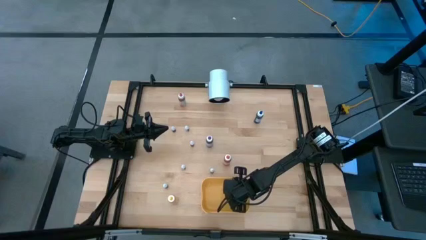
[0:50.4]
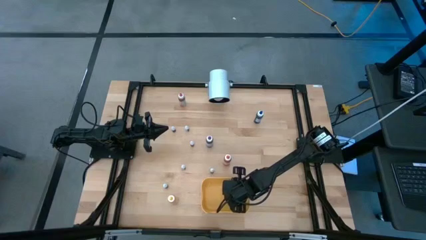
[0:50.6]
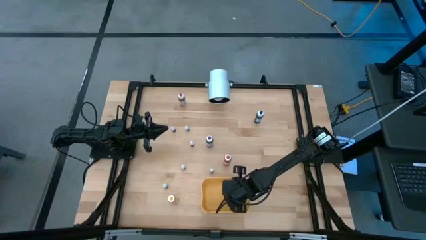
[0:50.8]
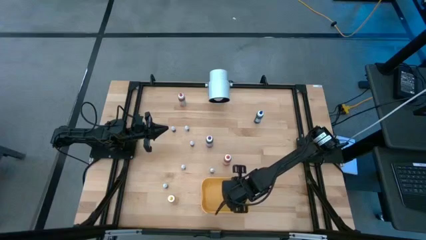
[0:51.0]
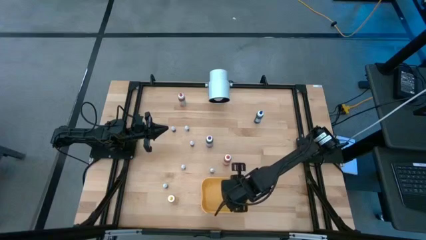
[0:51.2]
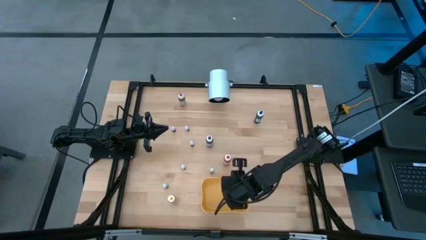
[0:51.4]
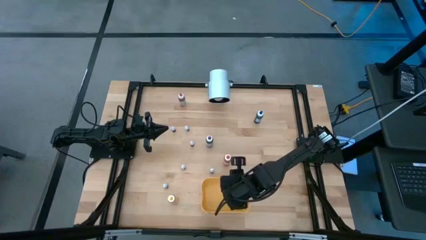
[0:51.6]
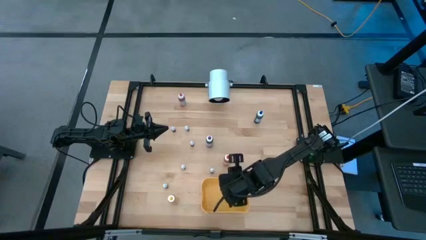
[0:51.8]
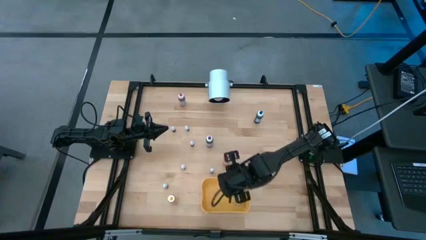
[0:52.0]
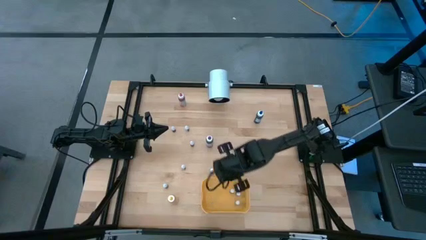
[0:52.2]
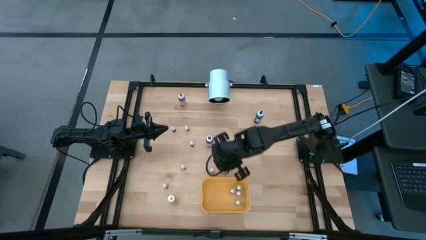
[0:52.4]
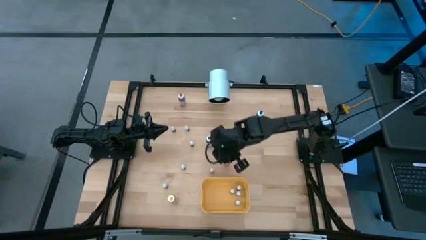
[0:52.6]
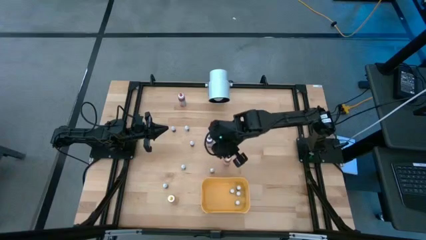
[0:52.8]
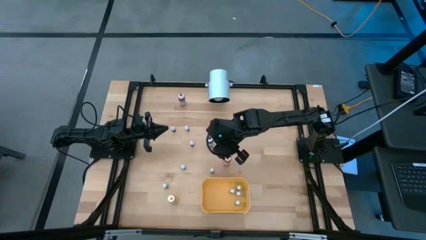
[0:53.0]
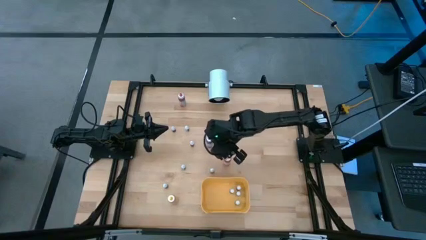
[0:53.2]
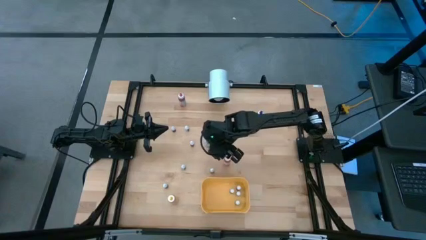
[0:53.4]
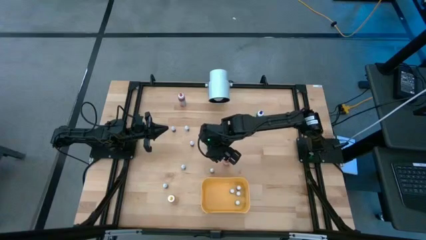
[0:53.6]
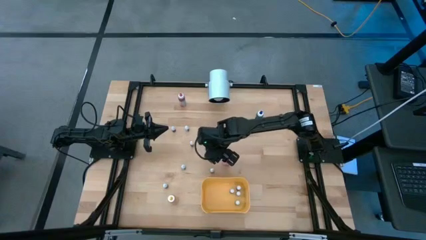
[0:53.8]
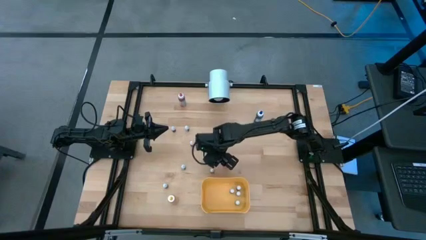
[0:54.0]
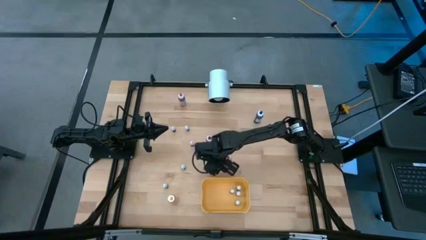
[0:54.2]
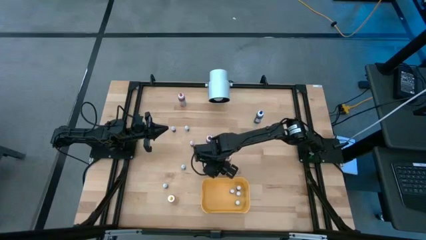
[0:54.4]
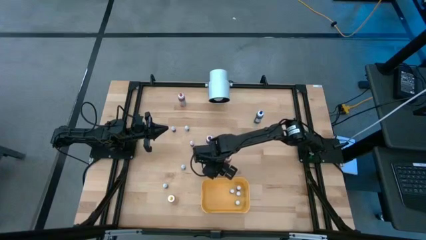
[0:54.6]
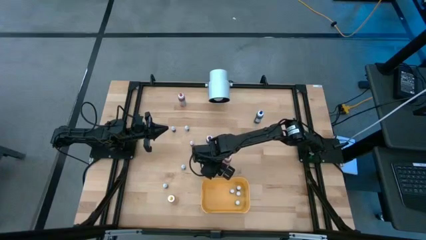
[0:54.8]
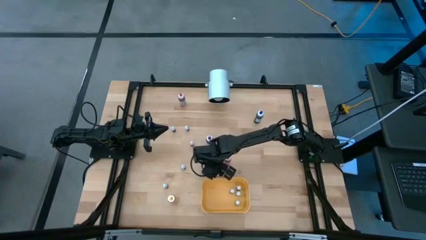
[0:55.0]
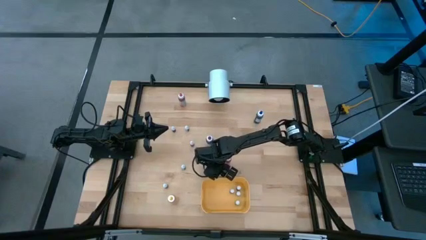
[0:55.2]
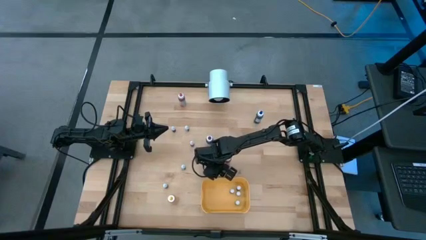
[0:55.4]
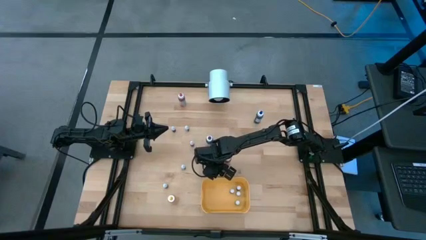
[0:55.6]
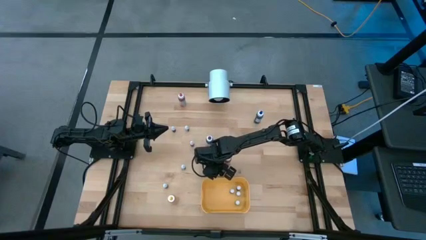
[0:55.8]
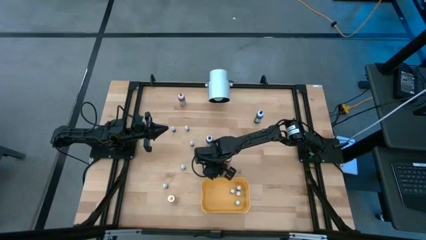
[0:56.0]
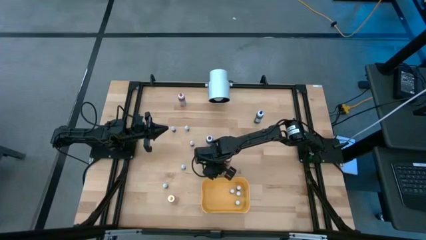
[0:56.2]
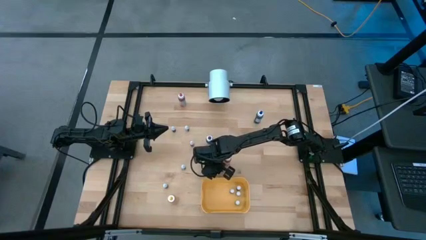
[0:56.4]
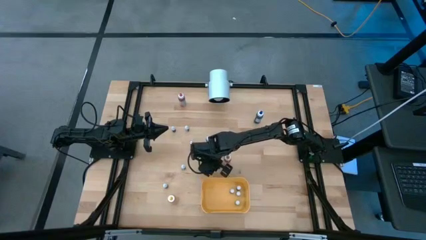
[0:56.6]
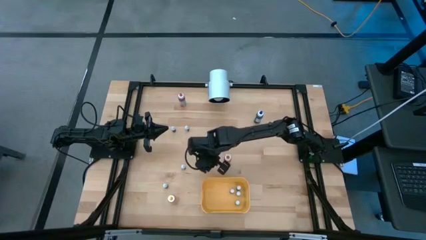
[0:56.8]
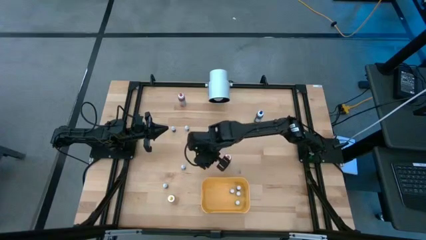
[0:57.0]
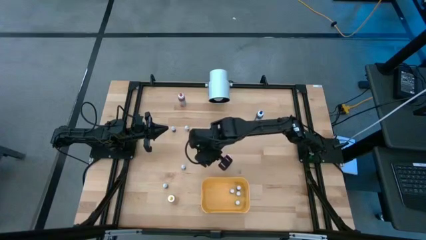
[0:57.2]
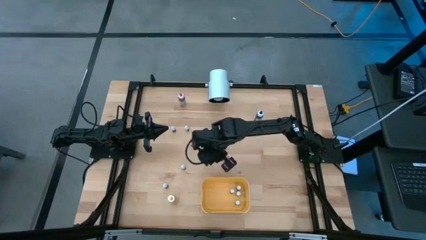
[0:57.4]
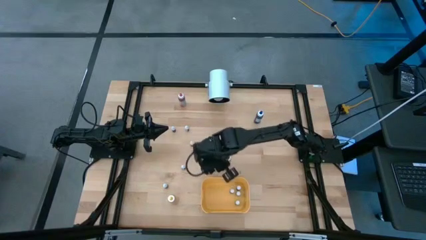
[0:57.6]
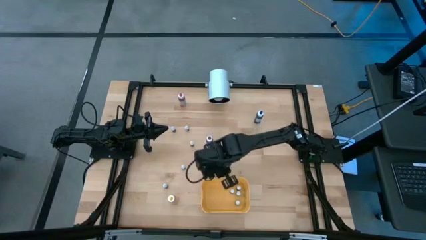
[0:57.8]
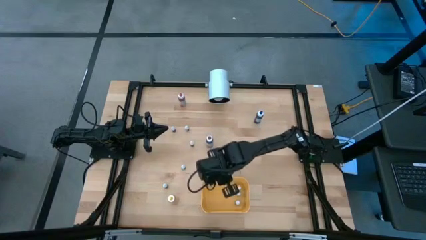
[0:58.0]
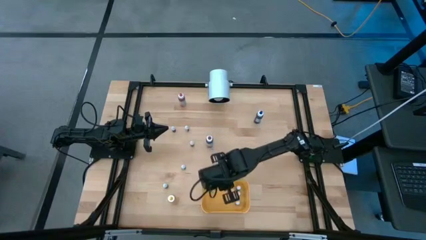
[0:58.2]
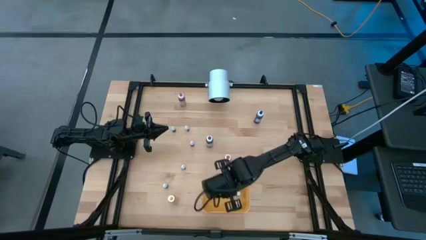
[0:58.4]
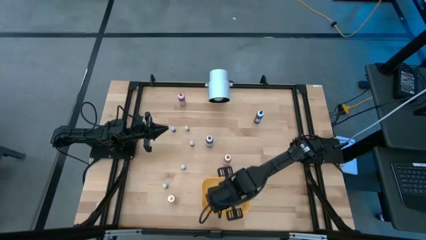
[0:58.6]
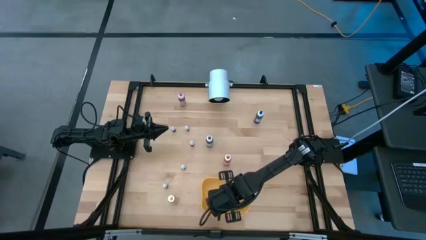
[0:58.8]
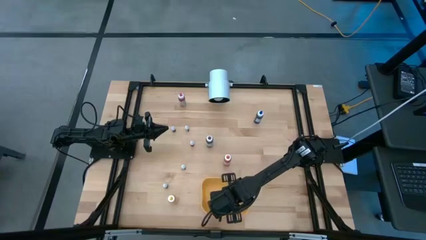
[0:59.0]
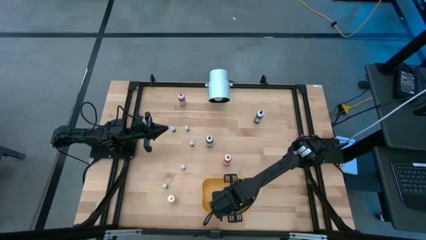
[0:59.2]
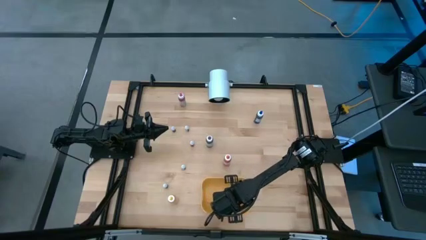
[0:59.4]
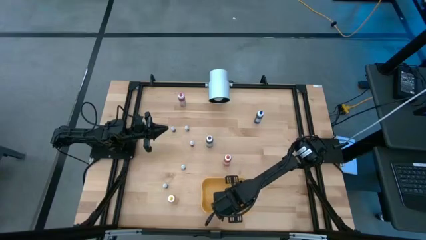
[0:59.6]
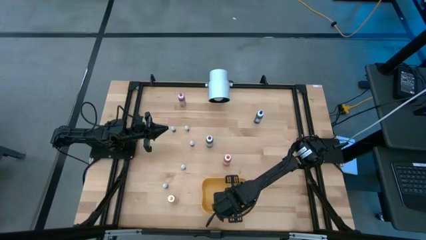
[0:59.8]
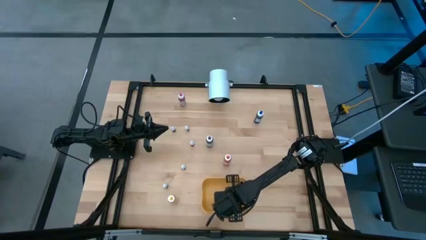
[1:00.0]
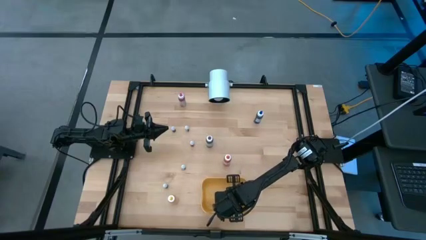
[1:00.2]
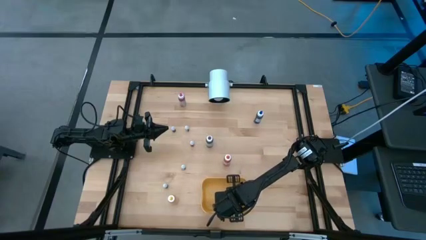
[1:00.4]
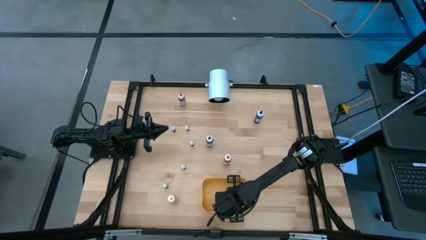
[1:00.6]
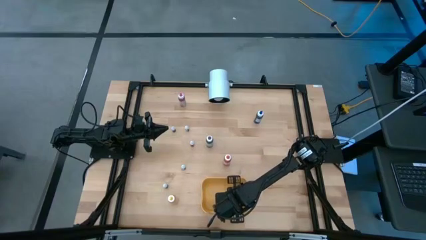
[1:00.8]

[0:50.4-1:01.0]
Task: Pick & Place food coloring
Put the small violet food coloring bottle into the yellow container
